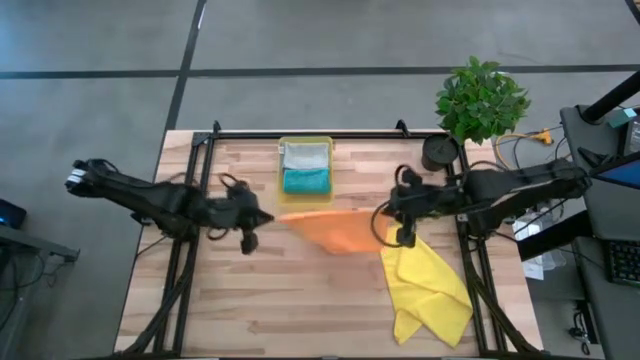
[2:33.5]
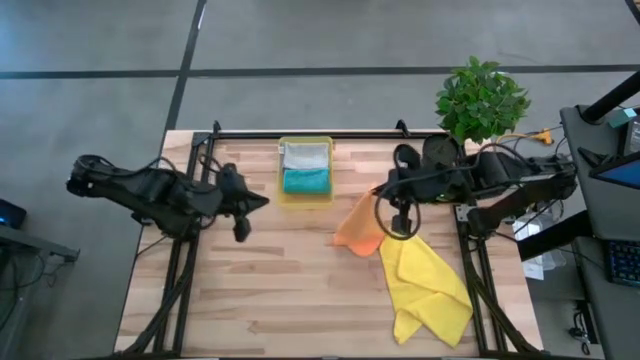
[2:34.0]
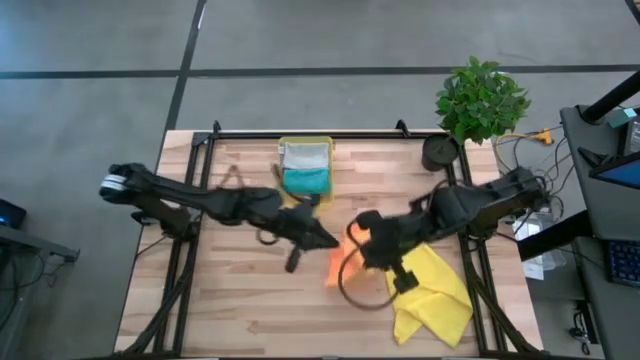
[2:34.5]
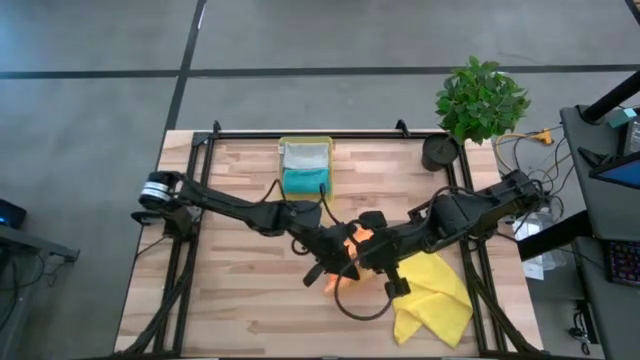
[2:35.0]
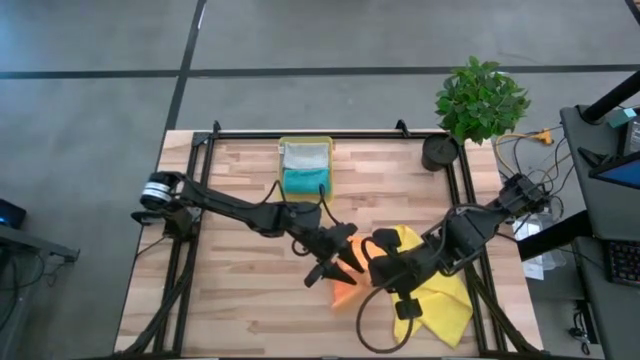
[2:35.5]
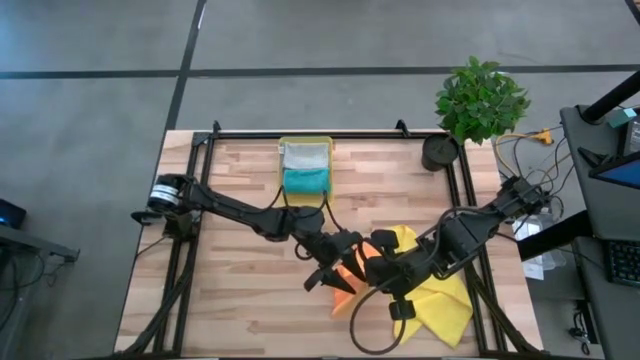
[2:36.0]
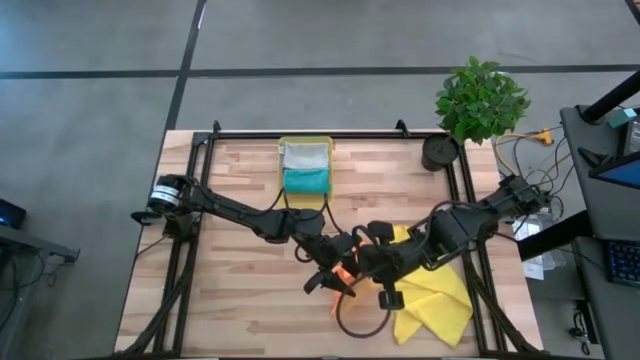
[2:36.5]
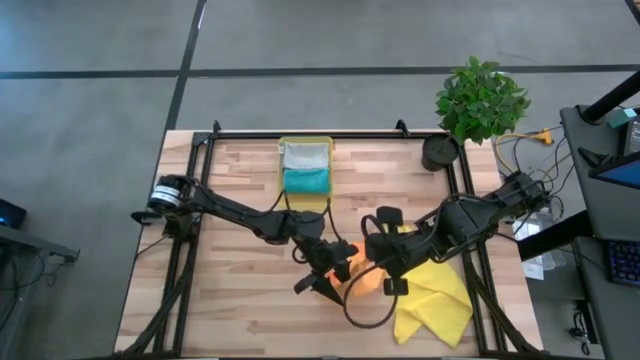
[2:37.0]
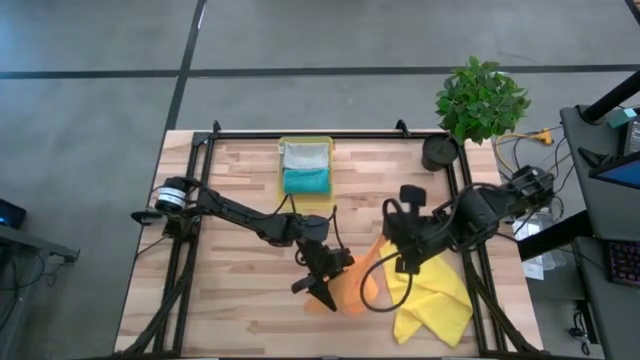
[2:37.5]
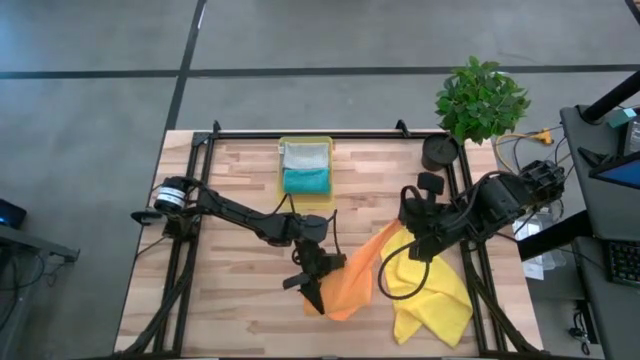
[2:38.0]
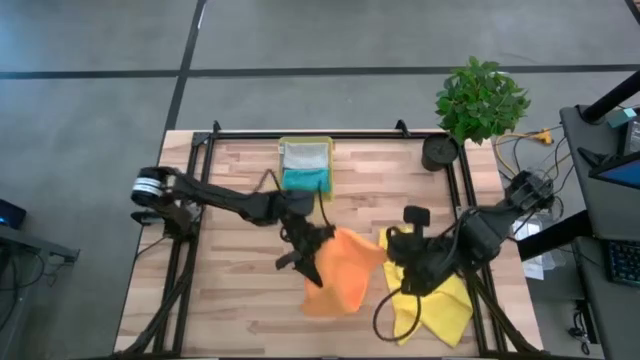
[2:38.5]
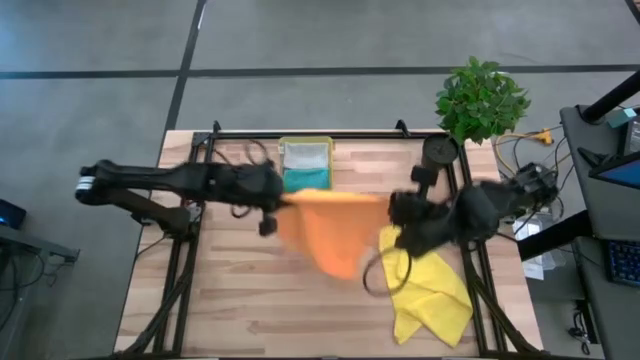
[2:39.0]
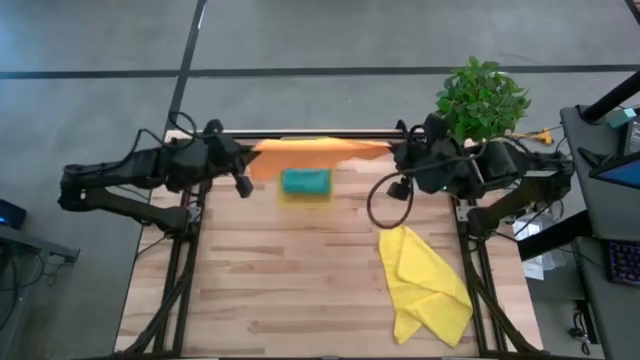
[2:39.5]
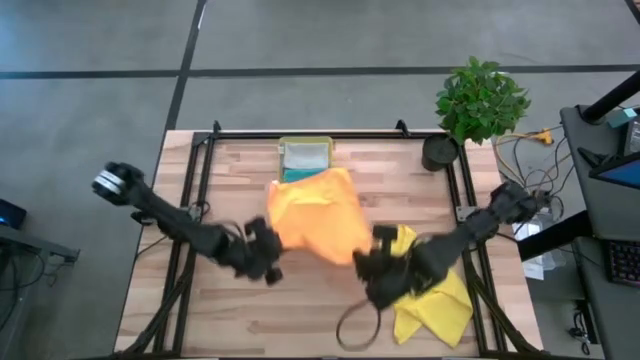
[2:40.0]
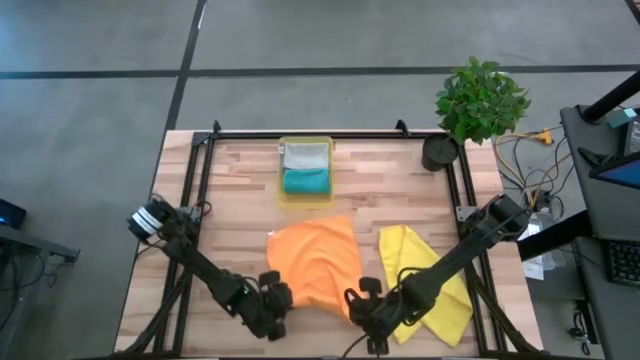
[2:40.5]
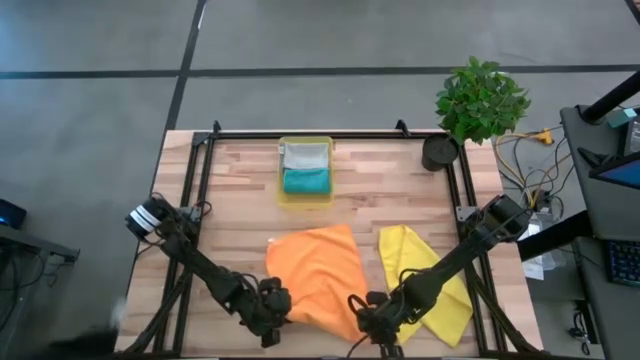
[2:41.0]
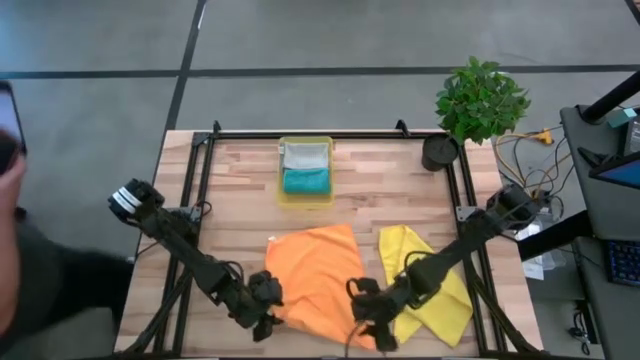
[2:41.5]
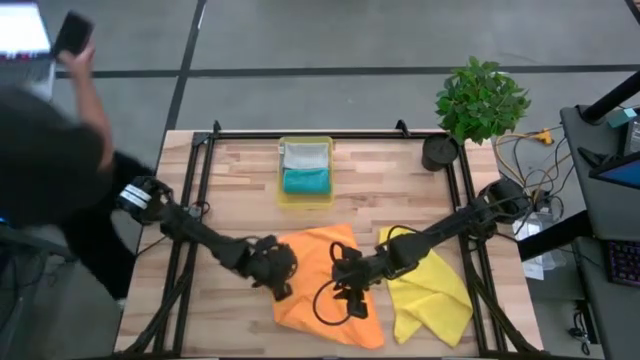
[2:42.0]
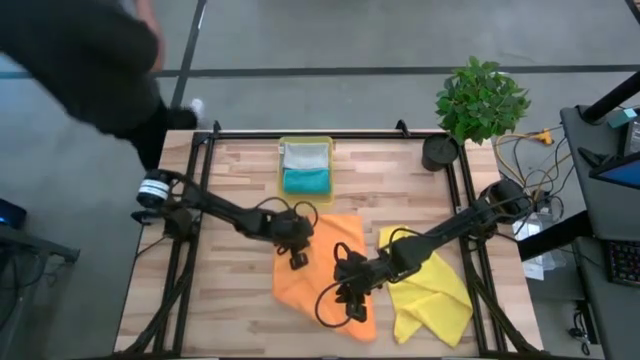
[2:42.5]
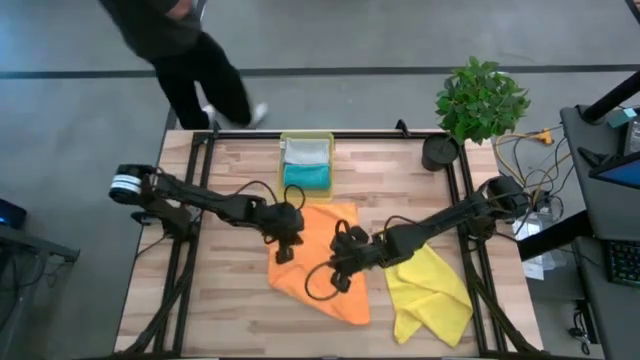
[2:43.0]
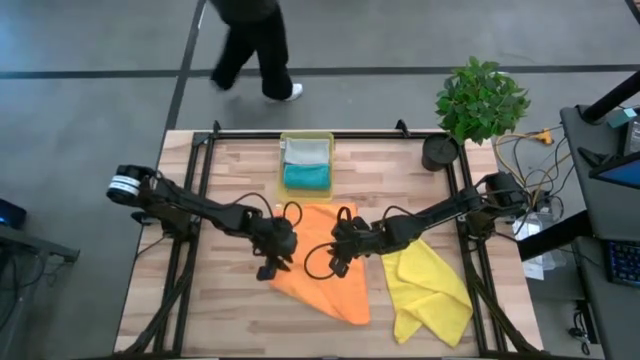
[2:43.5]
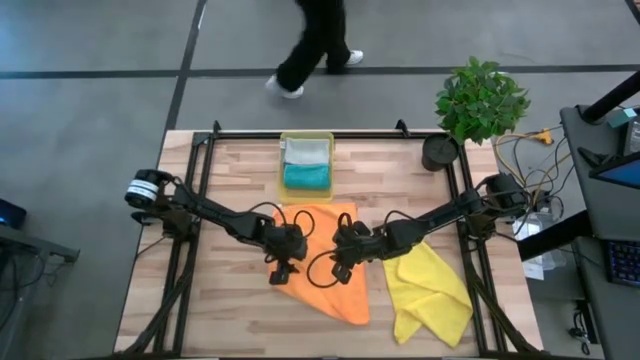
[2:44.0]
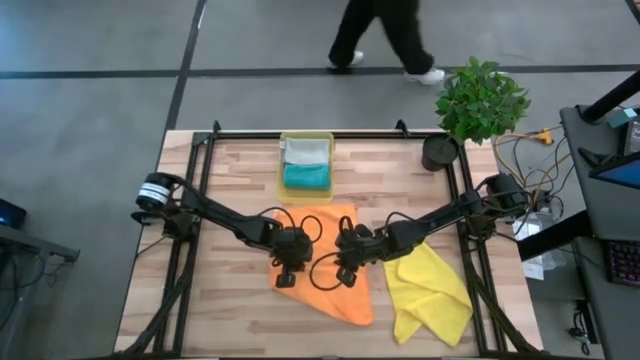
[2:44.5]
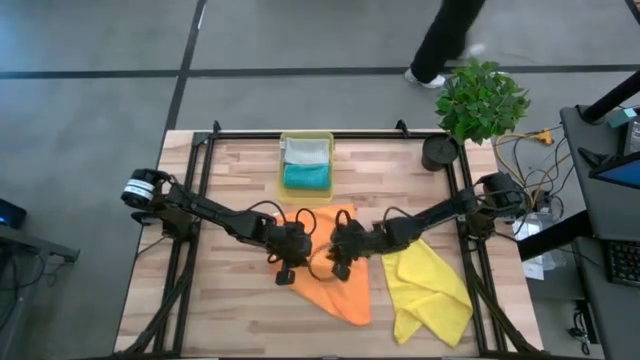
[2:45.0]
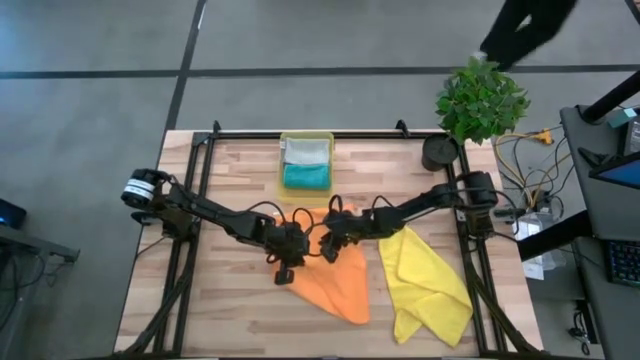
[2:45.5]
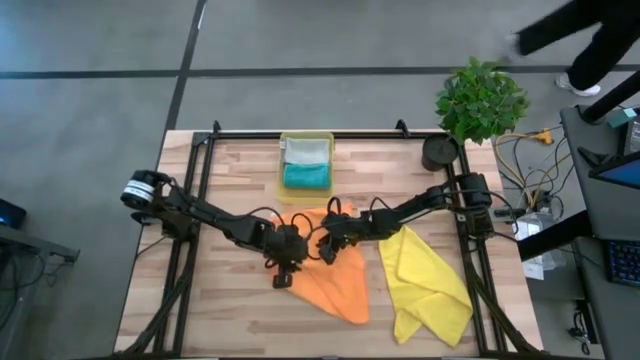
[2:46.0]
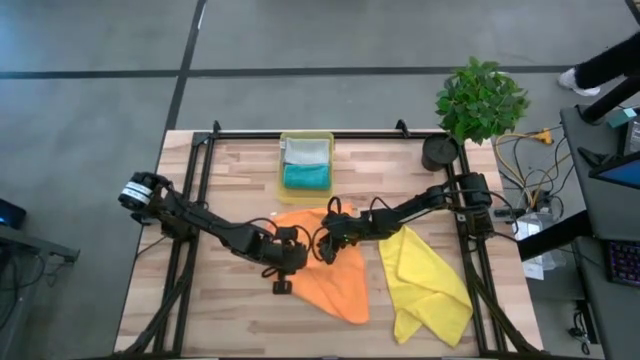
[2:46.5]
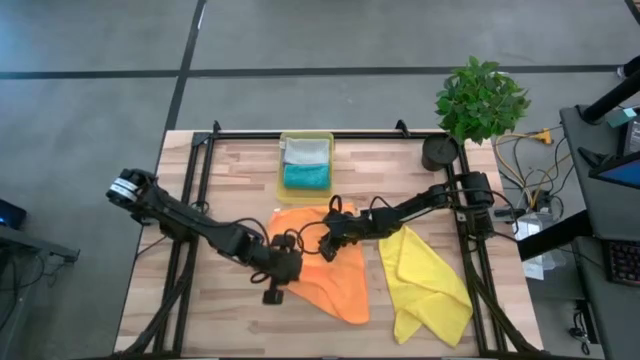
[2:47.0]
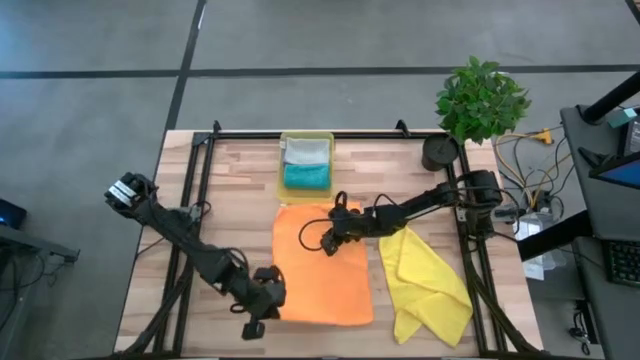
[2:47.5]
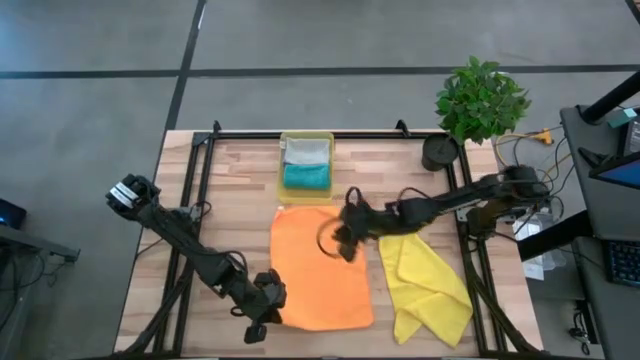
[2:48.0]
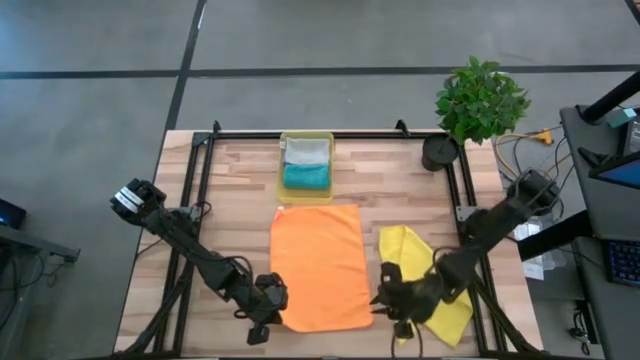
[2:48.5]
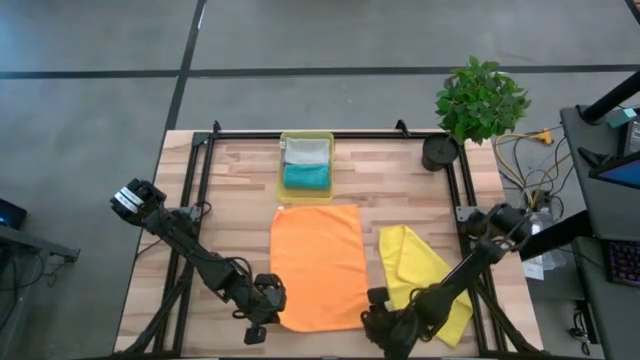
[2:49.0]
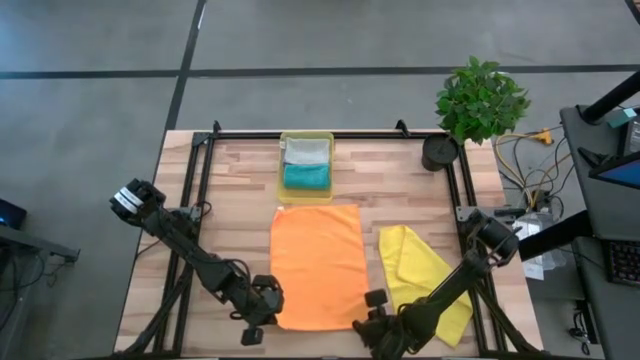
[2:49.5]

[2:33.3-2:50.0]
Task: Fold microfiber towels
Fold the orange microfiber cloth

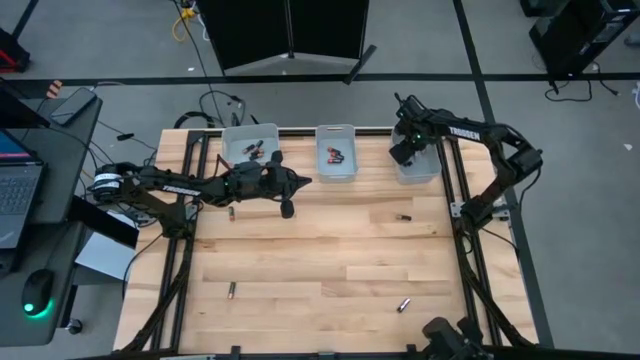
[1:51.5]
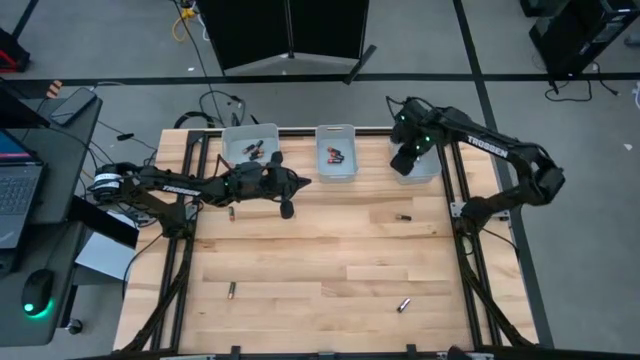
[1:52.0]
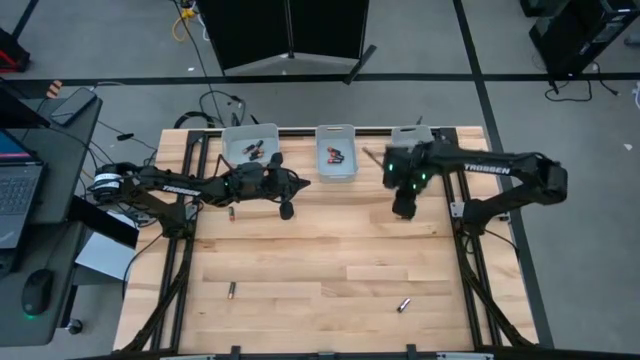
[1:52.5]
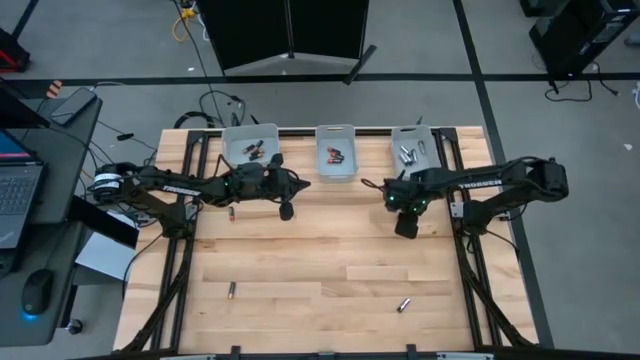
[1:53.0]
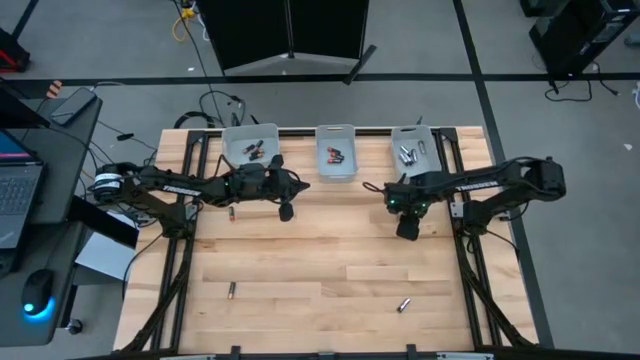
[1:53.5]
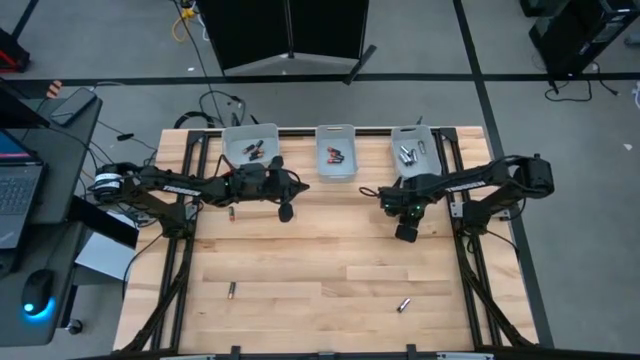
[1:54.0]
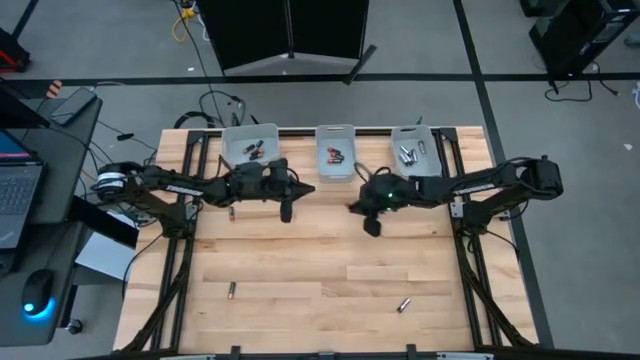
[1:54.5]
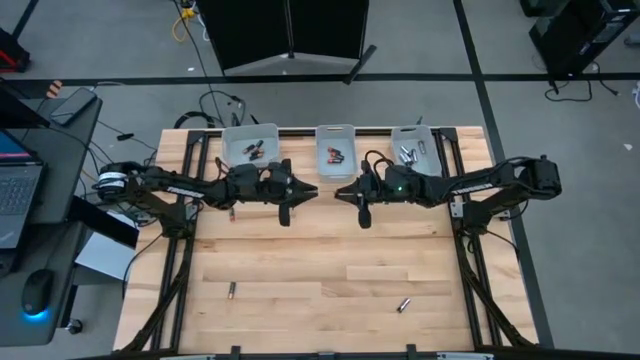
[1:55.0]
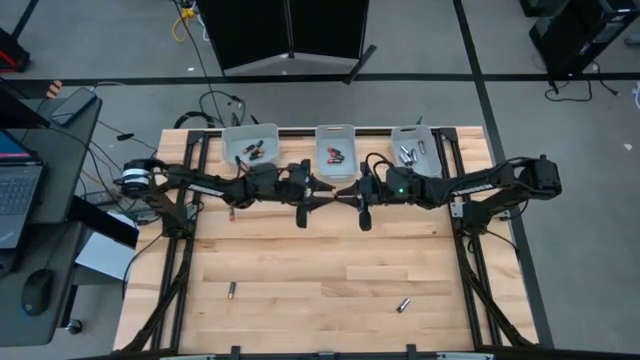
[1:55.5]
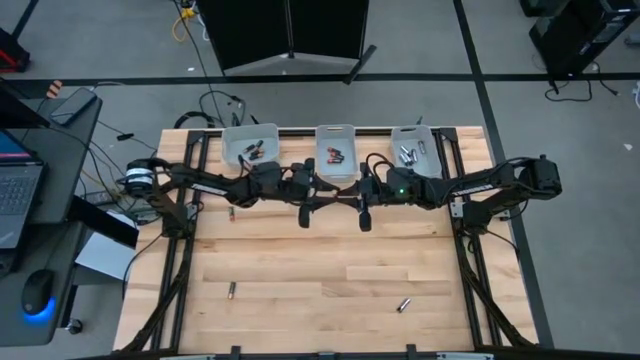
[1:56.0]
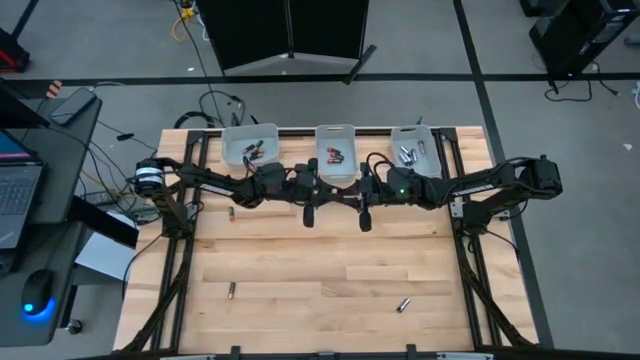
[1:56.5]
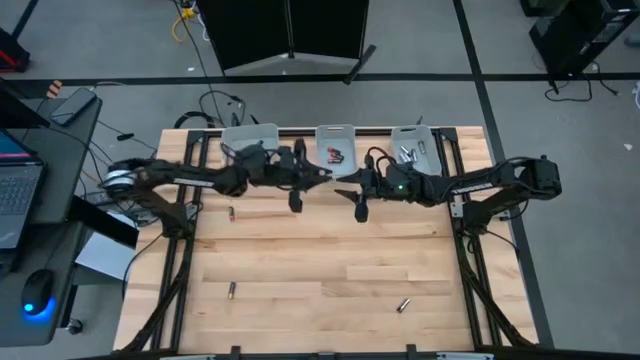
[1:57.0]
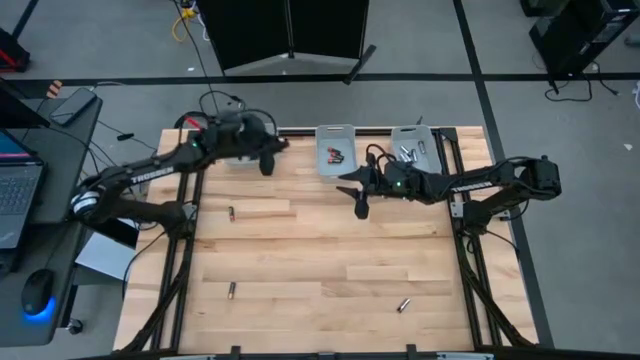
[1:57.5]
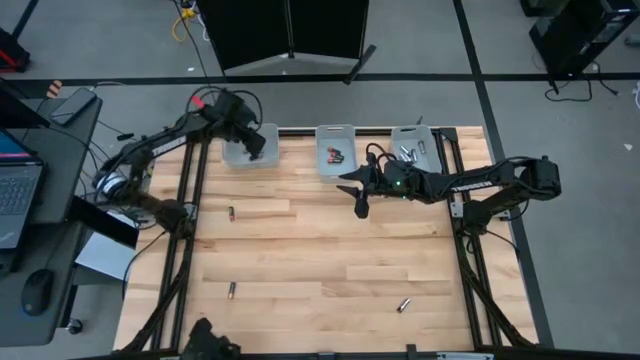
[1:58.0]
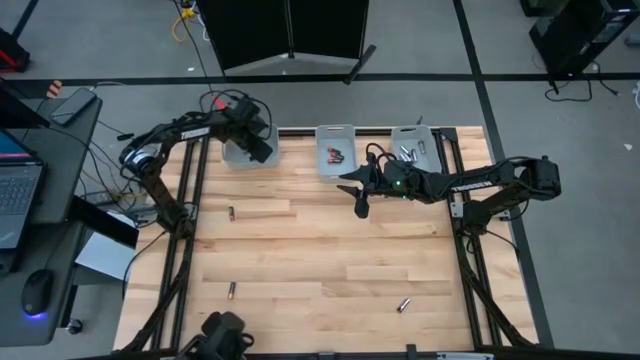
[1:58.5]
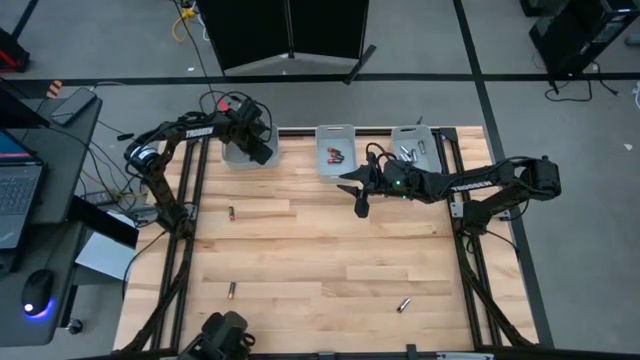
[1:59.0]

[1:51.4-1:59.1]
Task: Sort batteries
Put the top black brown battery into the left bin
